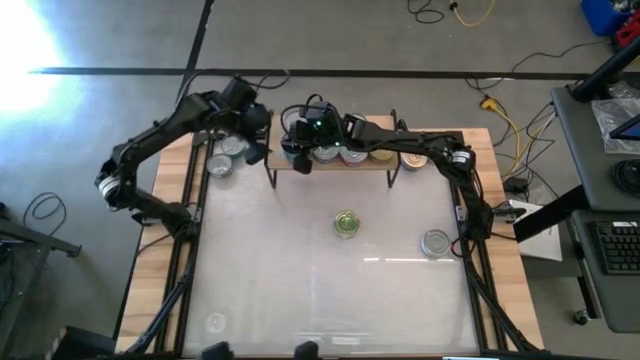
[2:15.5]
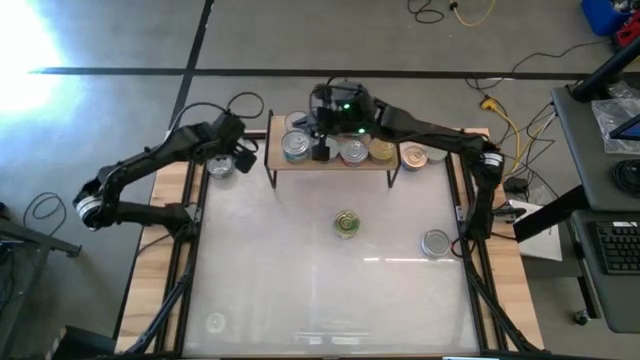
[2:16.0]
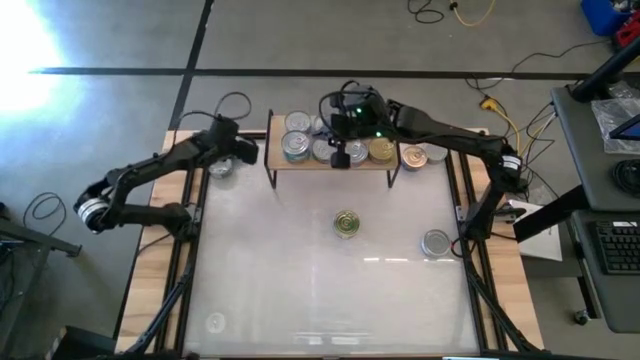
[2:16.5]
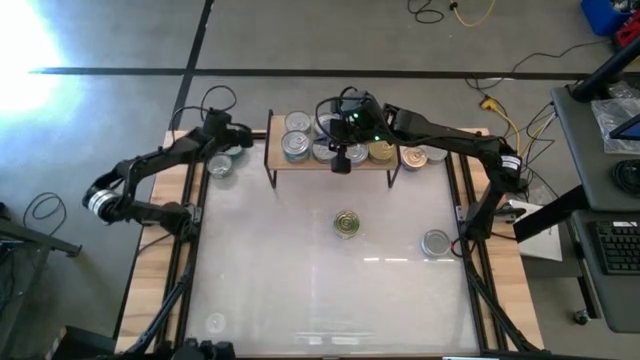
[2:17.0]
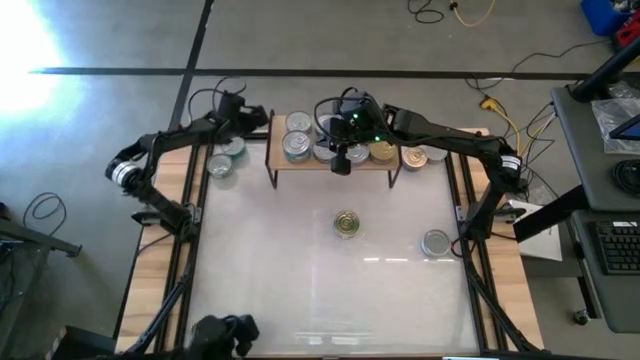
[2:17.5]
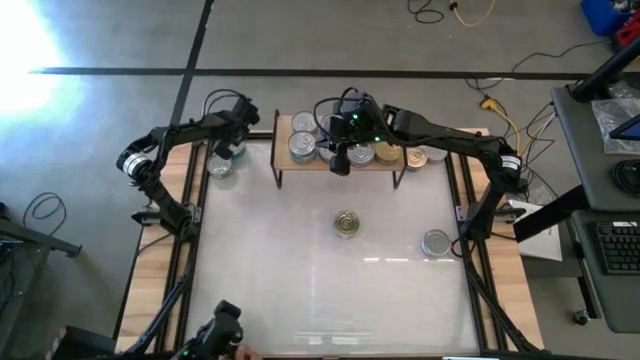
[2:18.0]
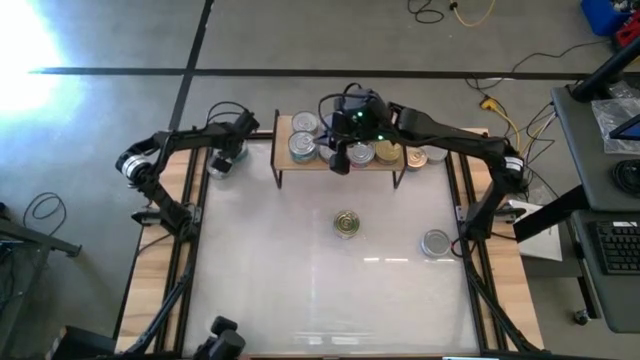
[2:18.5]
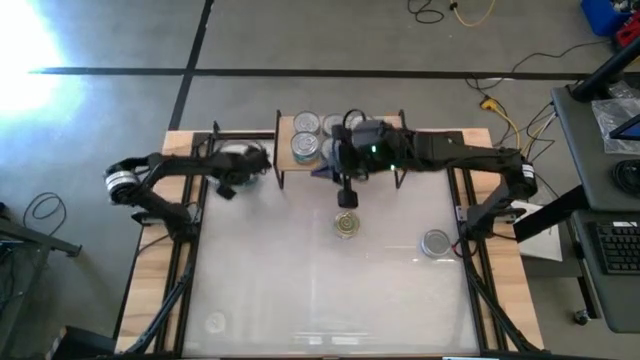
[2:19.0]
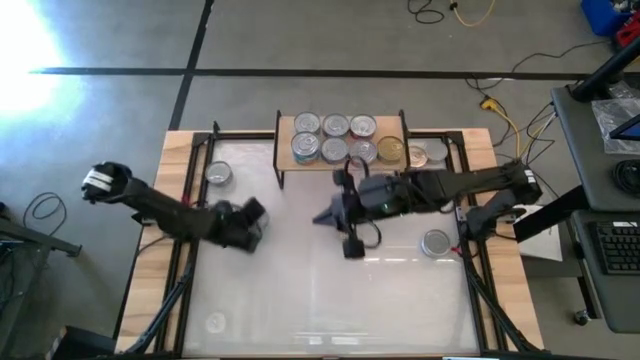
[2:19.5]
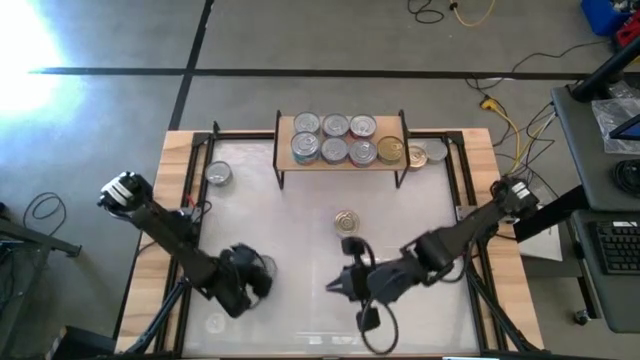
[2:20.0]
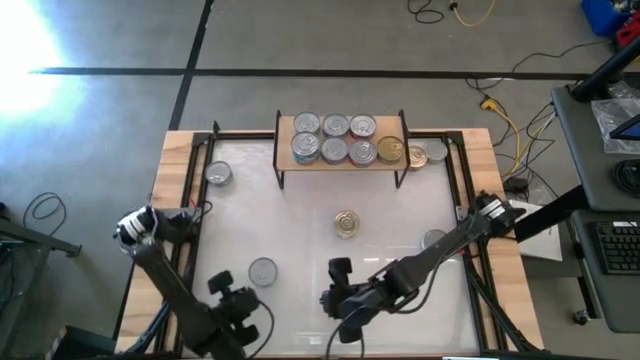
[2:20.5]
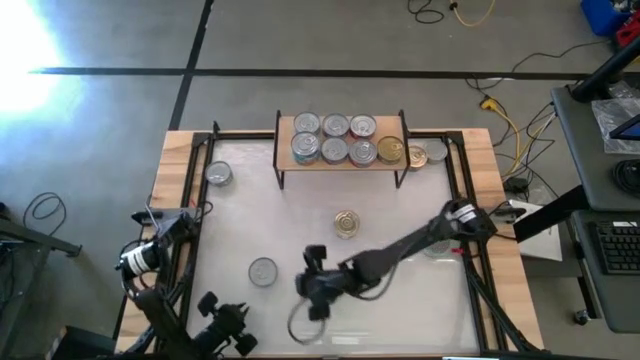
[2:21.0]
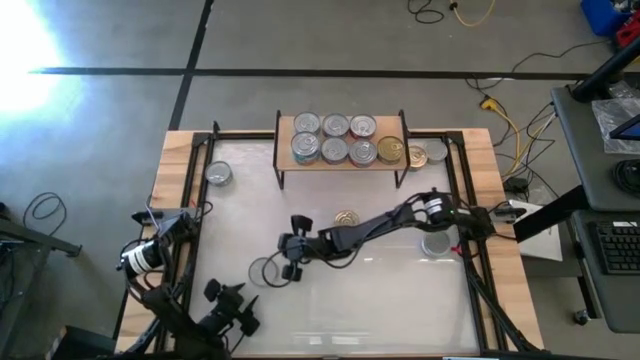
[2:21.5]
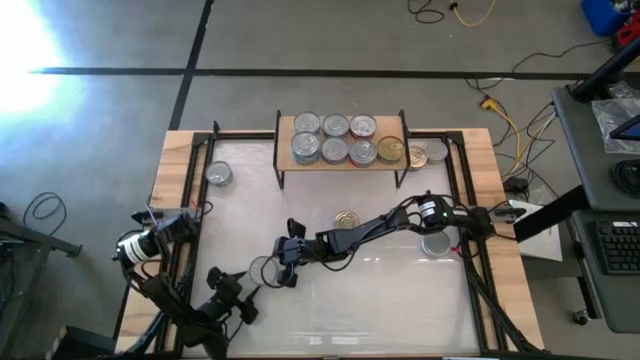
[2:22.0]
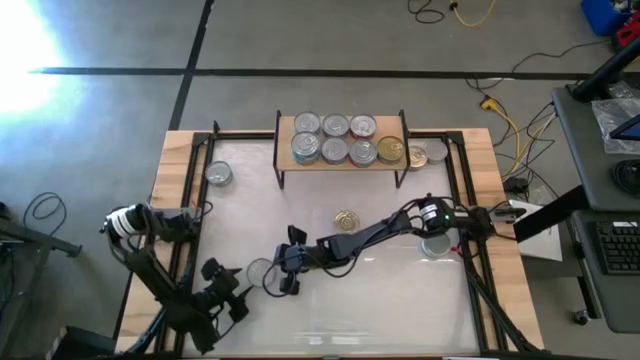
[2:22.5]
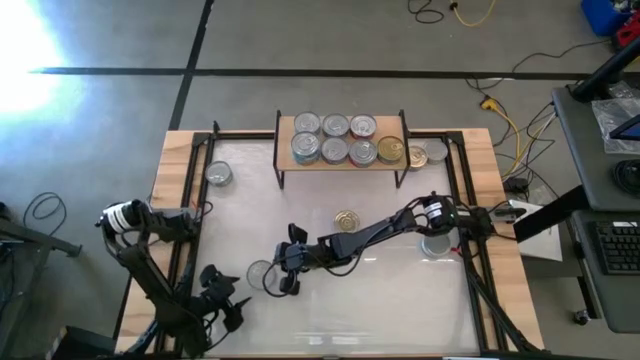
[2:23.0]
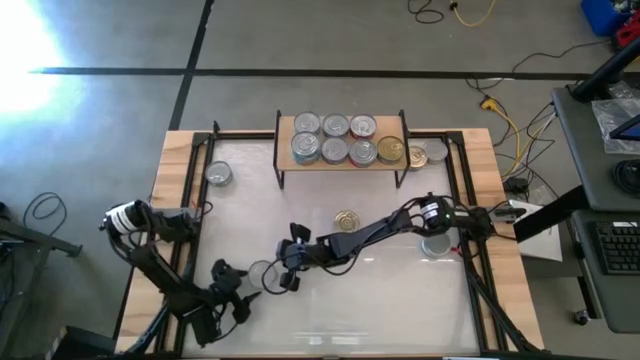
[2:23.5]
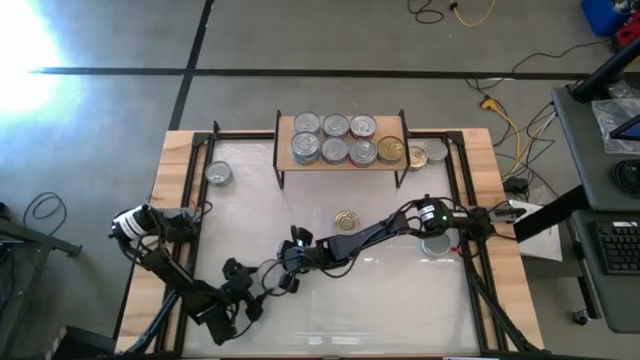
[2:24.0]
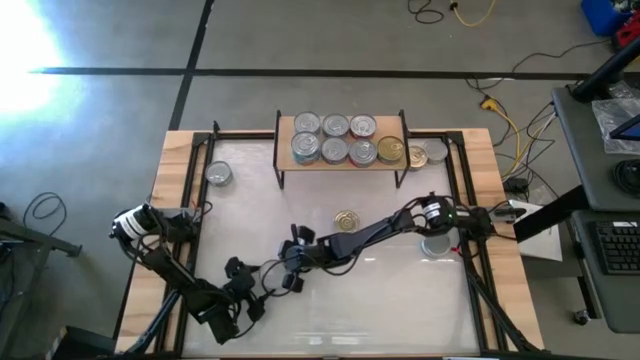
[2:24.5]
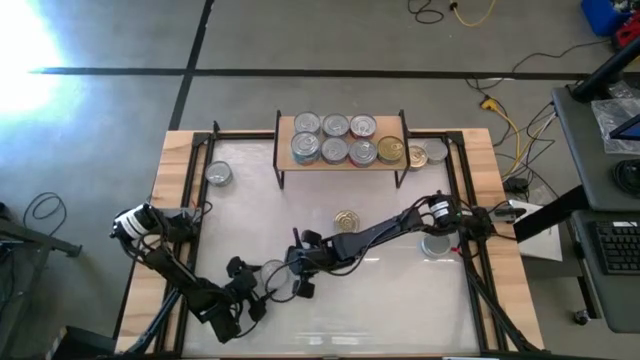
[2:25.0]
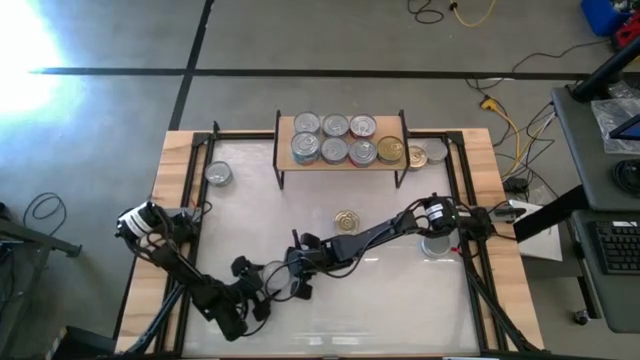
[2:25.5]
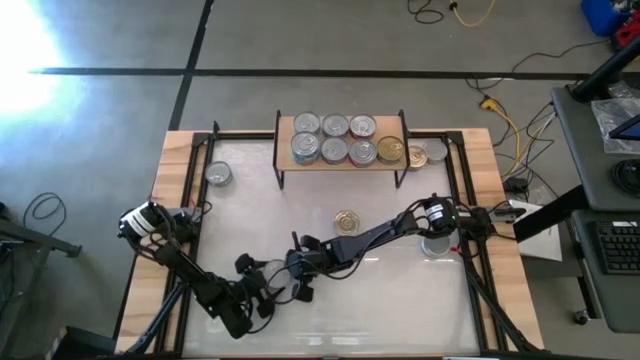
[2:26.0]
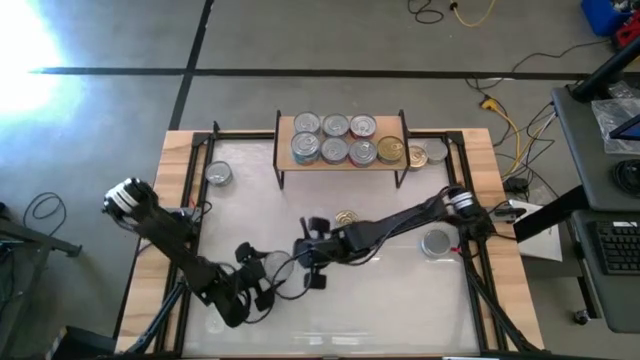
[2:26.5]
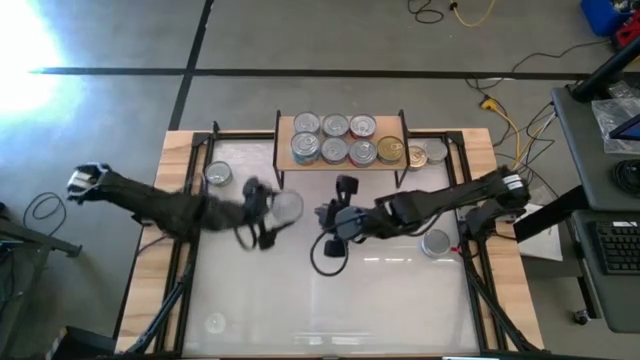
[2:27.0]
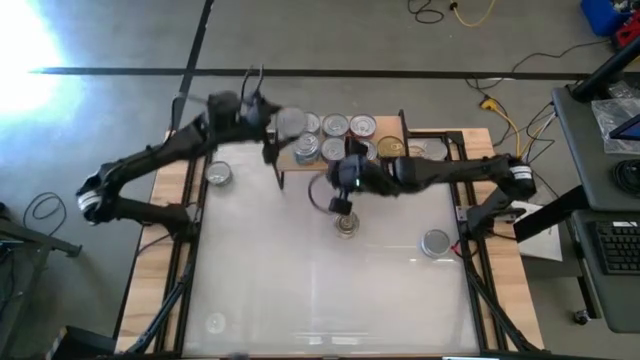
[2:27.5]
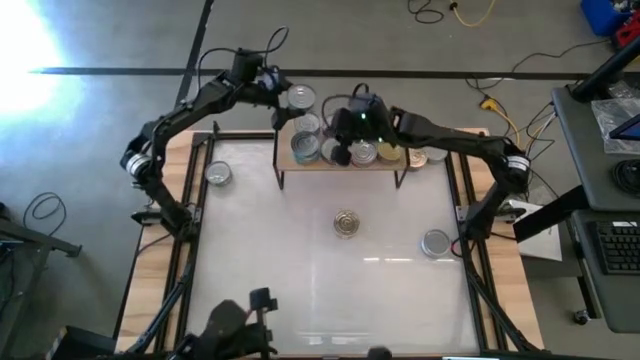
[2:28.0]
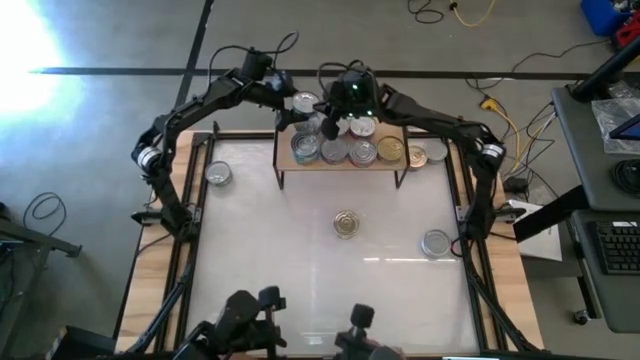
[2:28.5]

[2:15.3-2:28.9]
Task: Stack canned seafood by type on shelf
Stack the yellow-blue tuna can on top of the other yellow-blue tuna can on the shelf

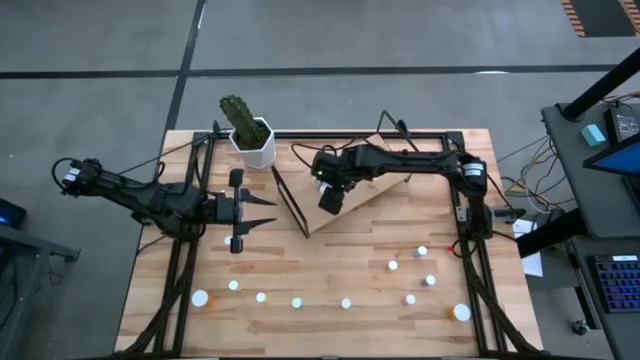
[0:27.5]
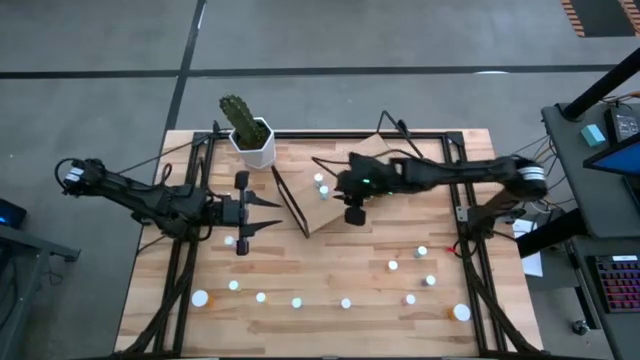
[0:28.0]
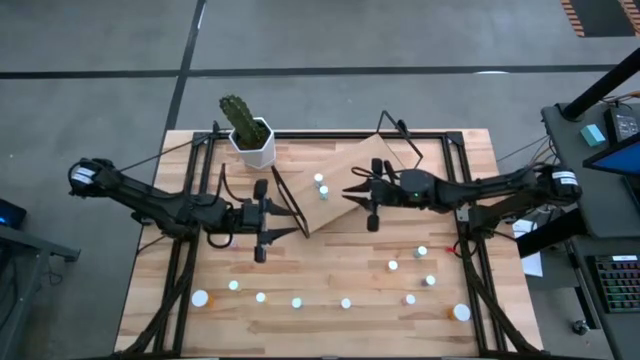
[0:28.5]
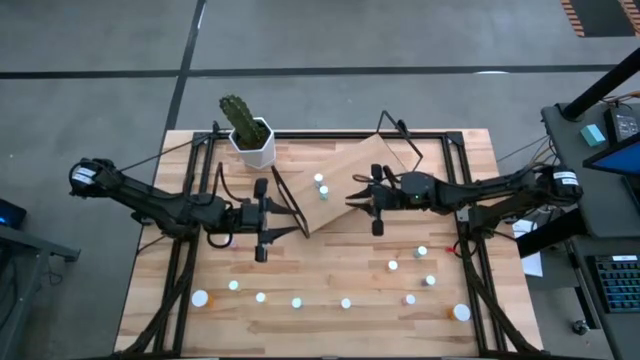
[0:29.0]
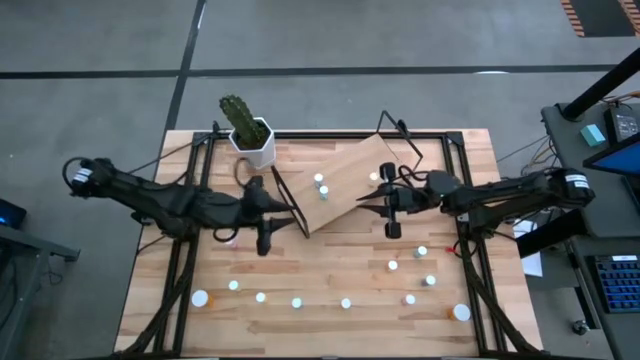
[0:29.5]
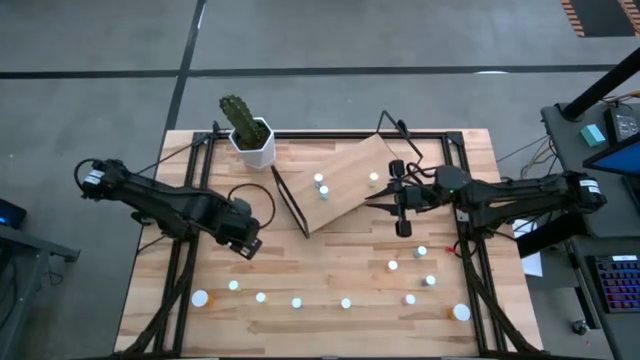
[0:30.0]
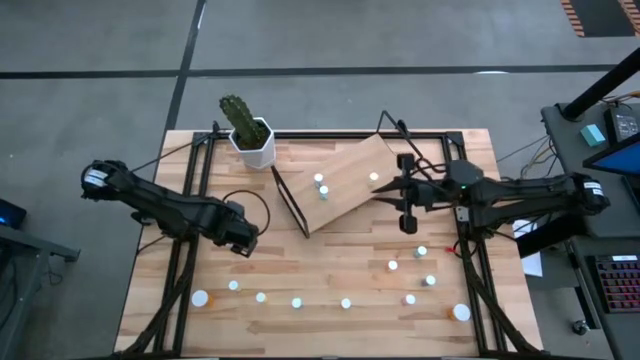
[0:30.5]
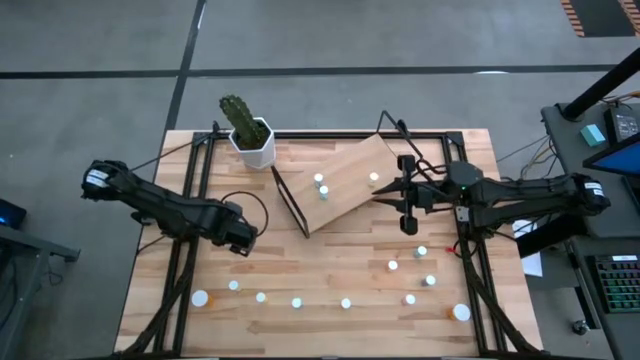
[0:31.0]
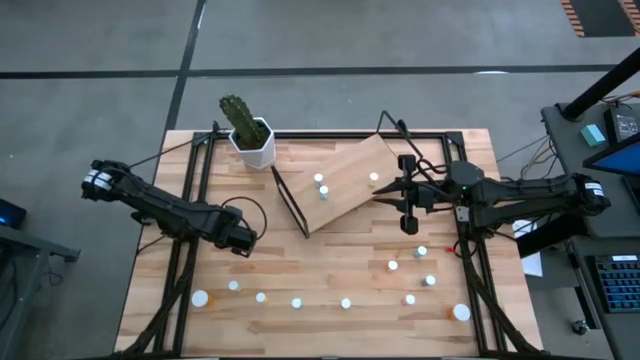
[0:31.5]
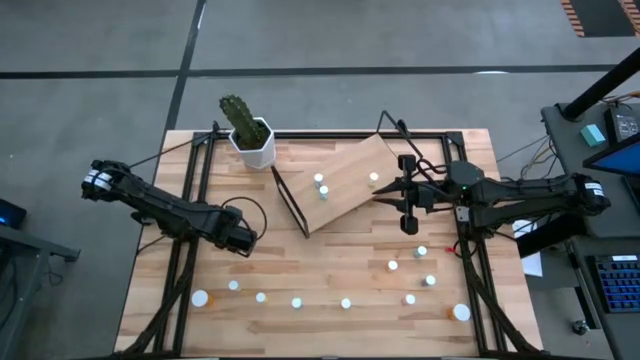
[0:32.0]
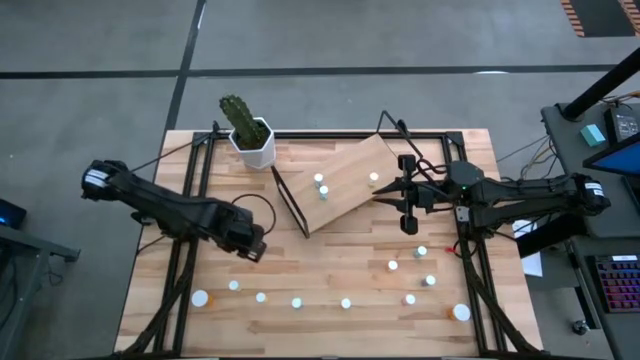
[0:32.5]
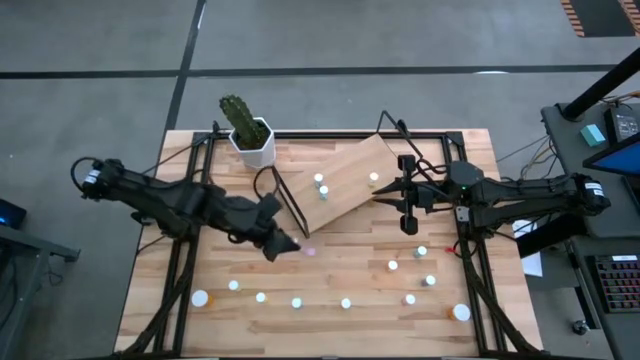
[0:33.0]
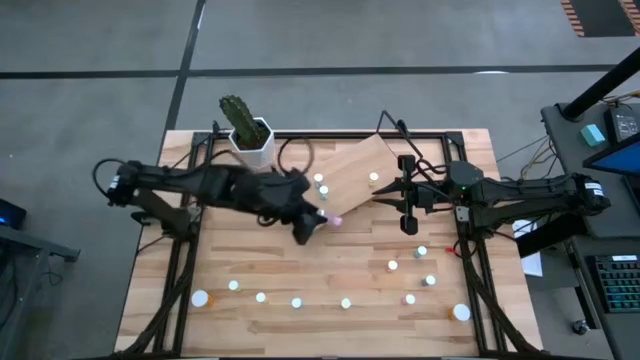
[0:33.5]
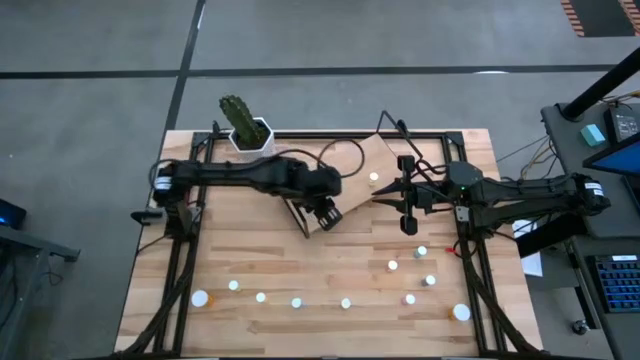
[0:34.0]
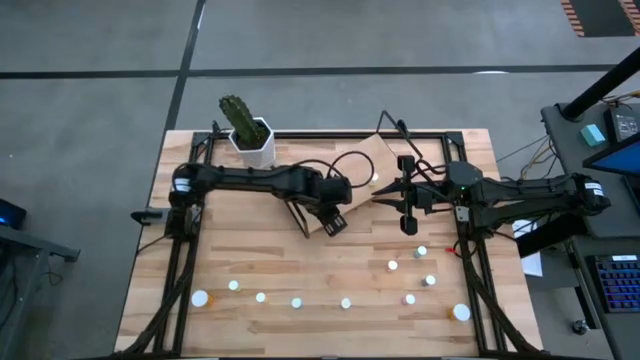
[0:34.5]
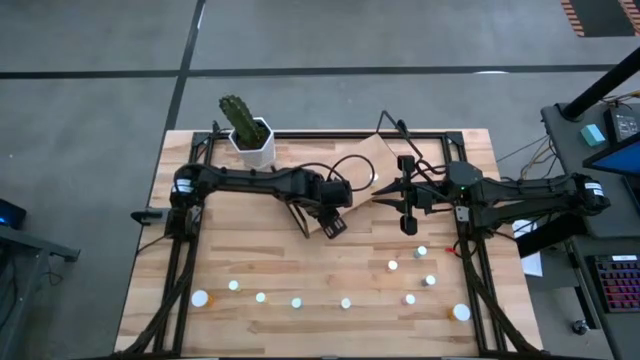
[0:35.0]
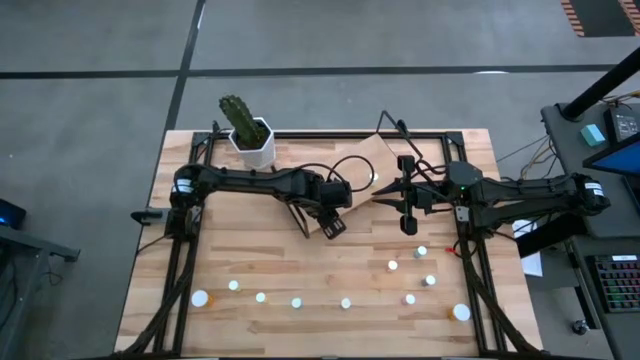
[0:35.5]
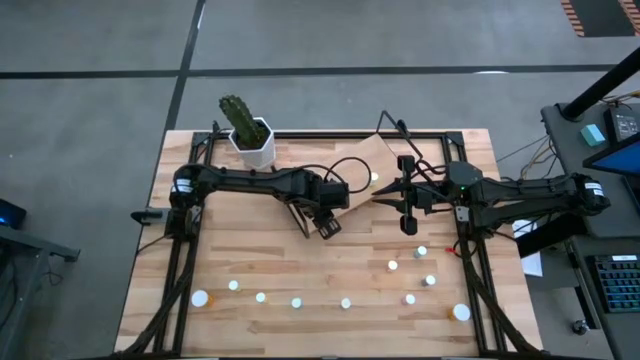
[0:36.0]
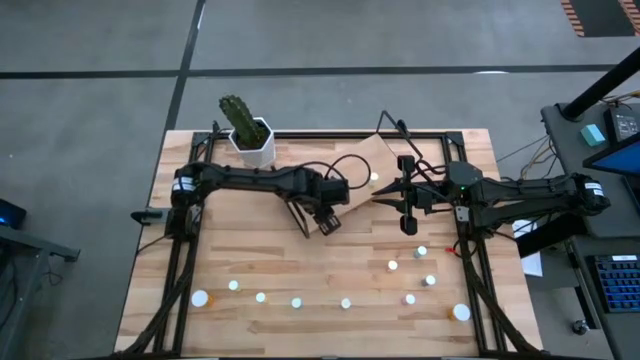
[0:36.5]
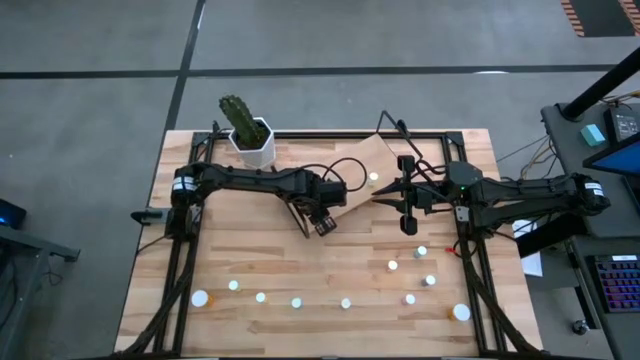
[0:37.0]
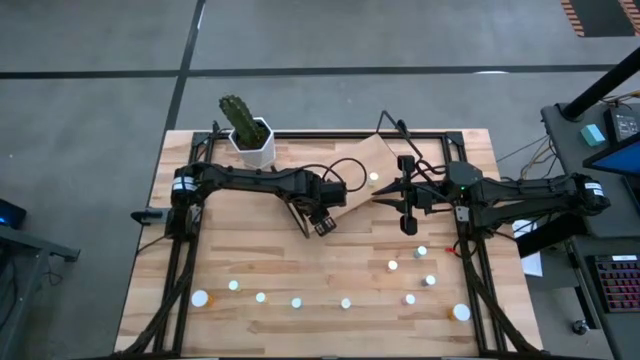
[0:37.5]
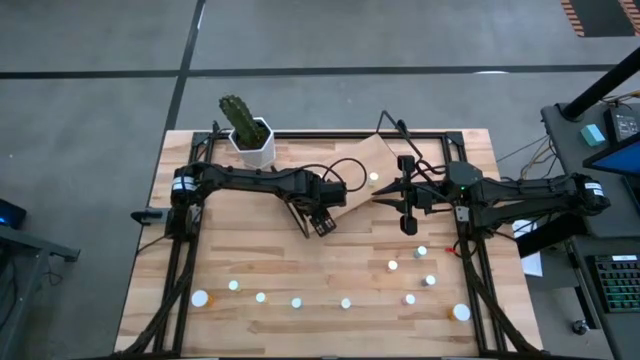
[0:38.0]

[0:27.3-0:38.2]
Task: Pick and place medicine bottles onto shelf by color
Put the pink pill bottle on the shelf
